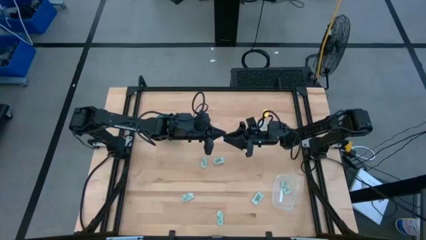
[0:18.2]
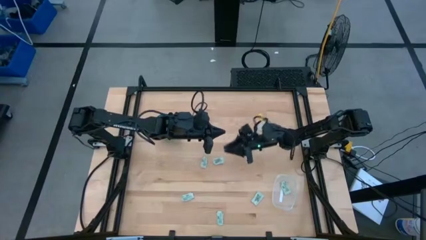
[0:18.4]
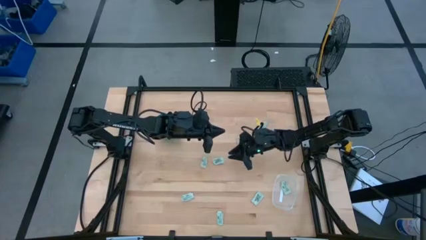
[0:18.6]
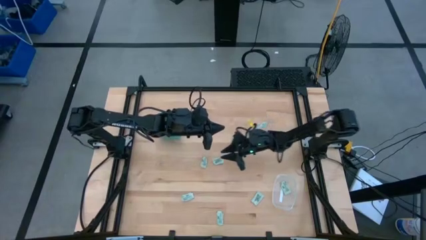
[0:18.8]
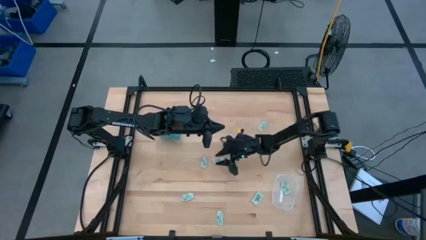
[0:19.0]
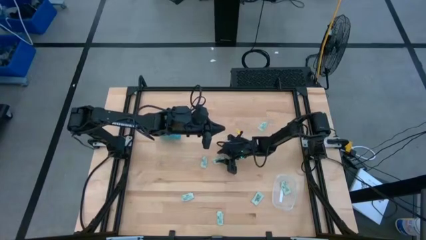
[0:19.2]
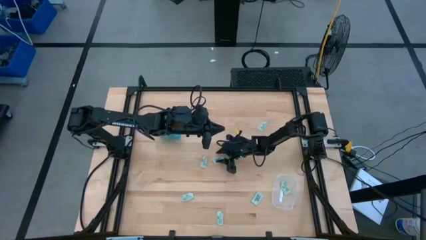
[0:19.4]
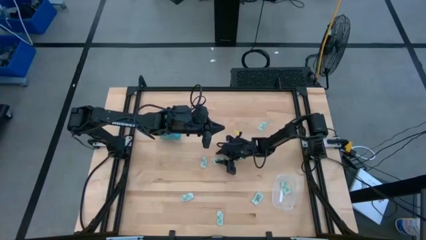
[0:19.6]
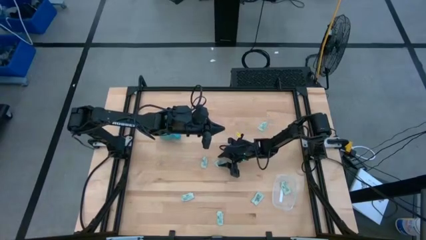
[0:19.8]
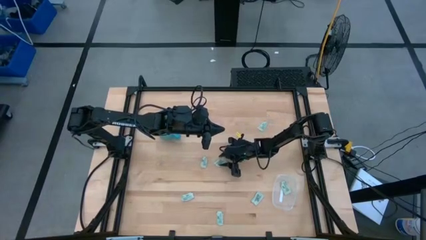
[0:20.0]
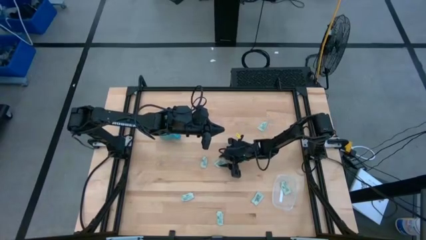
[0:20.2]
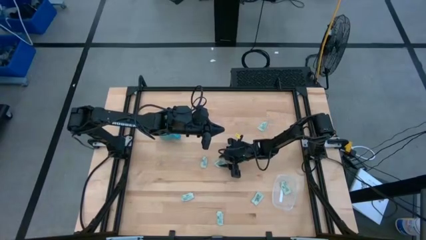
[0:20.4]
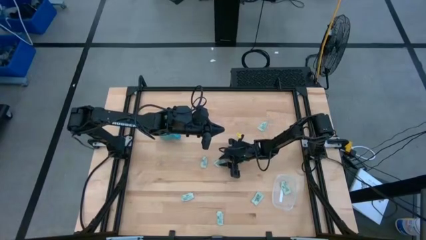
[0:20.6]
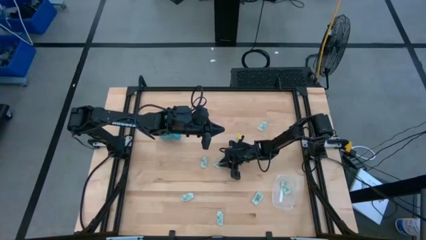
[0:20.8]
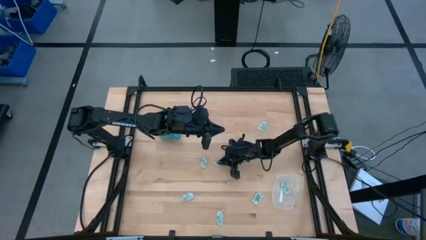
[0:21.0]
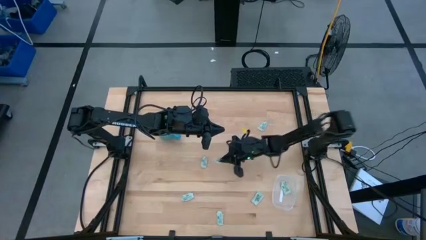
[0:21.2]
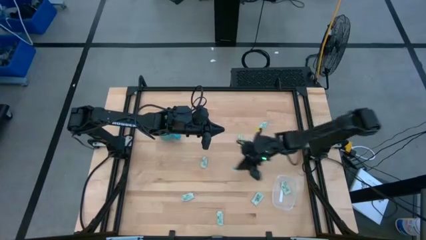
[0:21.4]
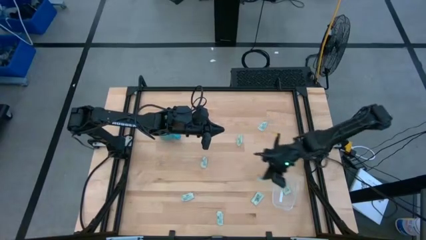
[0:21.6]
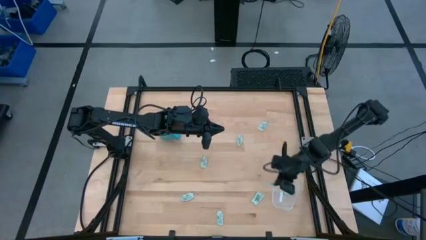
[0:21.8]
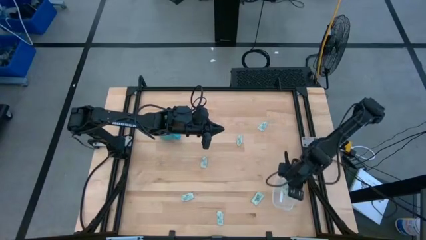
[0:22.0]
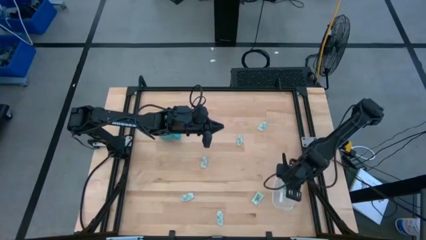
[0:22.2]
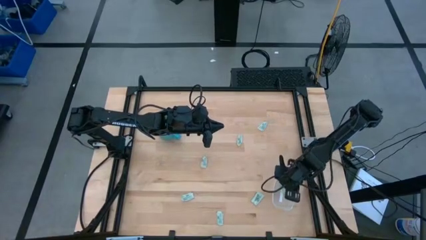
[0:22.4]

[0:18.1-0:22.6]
Task: Pick and place Stevia / Truvia into bins
Put the stevia packet into the transparent container

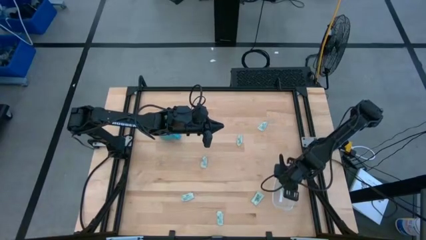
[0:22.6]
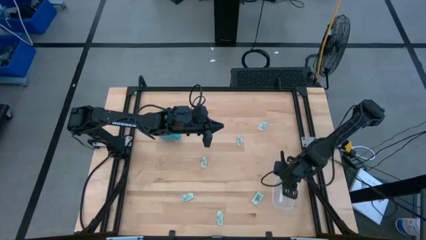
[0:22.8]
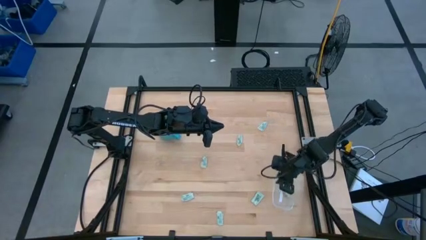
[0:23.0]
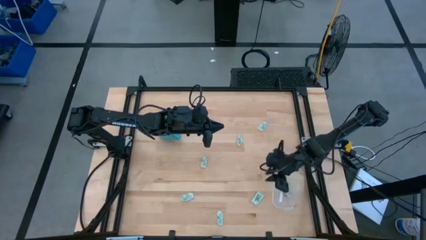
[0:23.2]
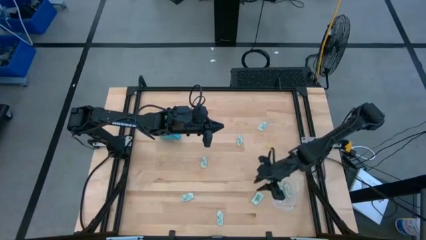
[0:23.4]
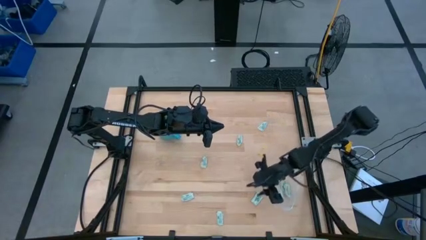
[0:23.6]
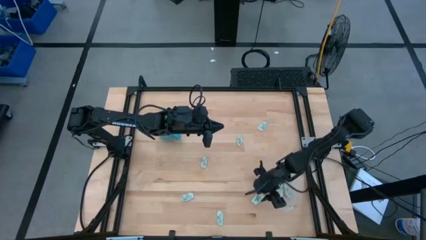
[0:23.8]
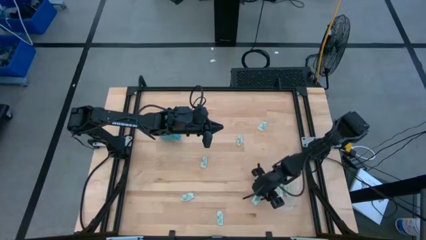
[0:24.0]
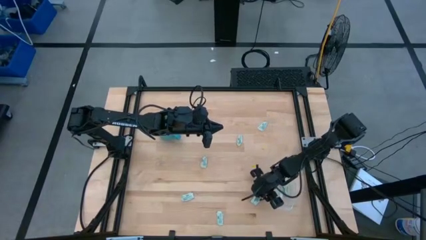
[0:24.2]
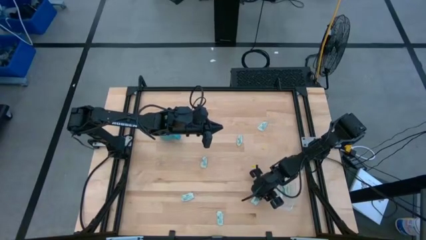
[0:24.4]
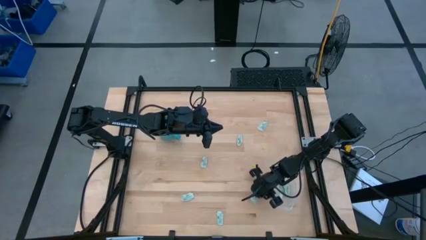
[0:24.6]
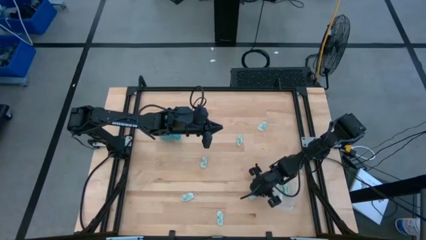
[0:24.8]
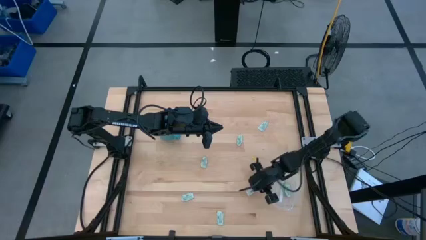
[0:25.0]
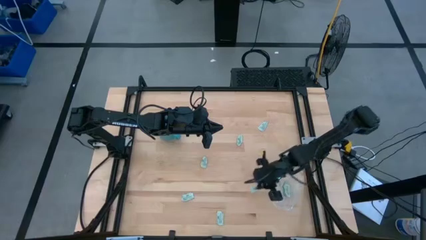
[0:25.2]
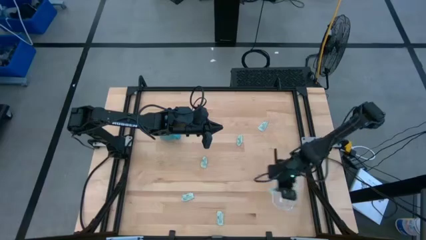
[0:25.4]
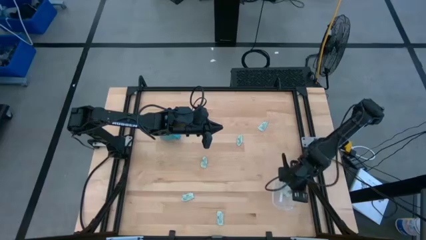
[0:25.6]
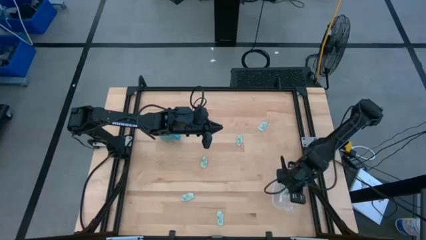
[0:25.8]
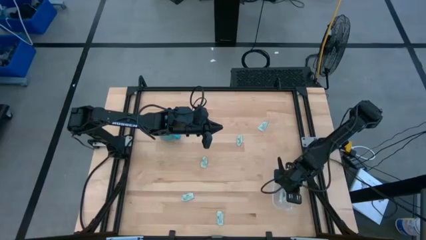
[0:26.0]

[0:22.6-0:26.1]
Put the stevia packet into the transparent container

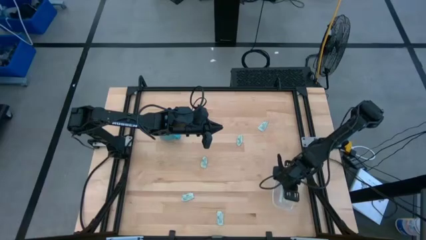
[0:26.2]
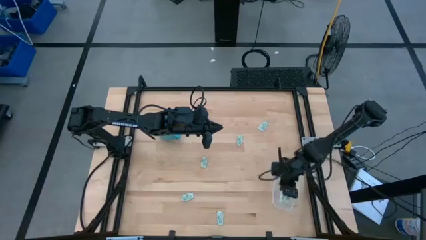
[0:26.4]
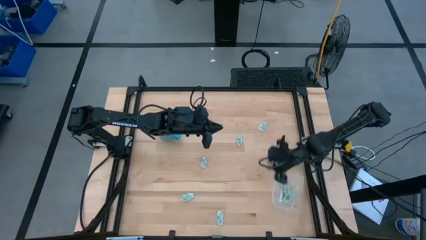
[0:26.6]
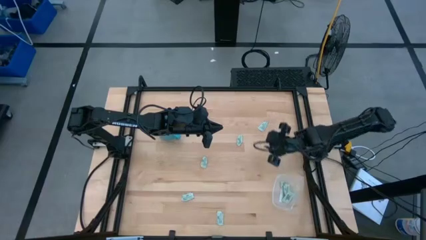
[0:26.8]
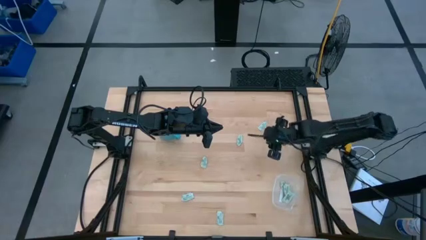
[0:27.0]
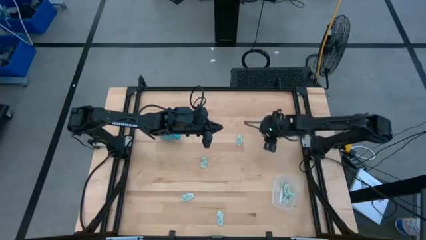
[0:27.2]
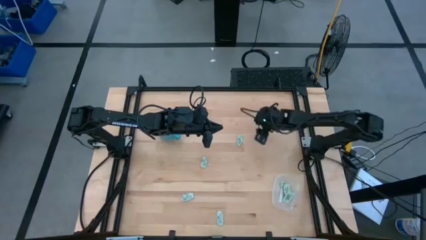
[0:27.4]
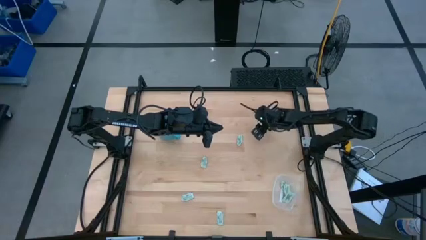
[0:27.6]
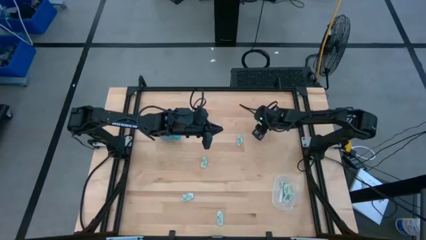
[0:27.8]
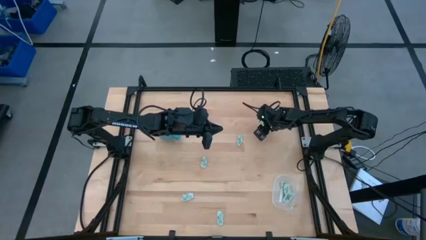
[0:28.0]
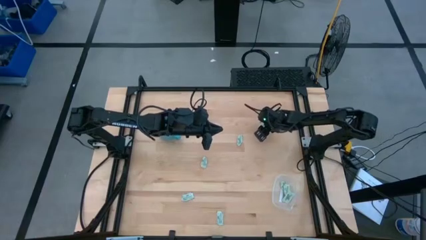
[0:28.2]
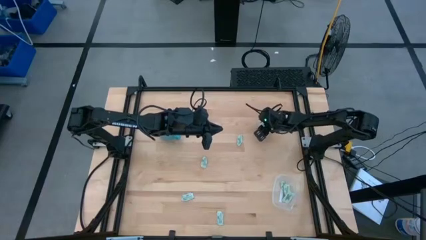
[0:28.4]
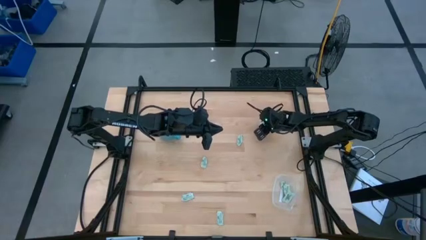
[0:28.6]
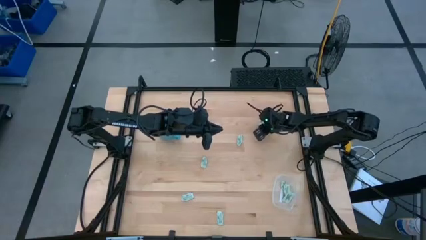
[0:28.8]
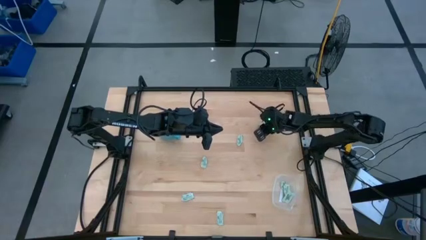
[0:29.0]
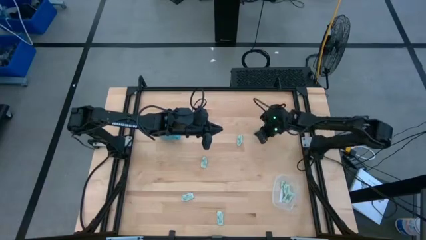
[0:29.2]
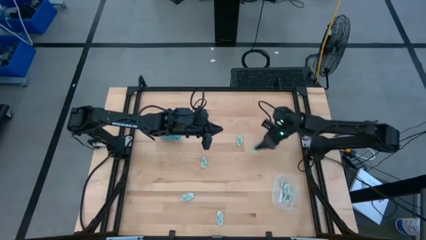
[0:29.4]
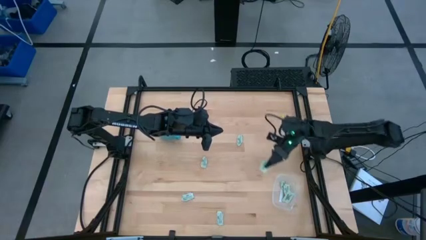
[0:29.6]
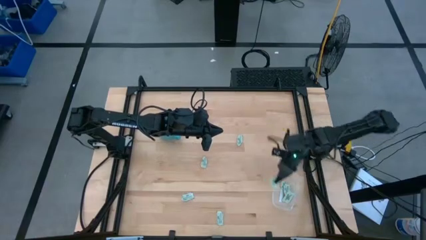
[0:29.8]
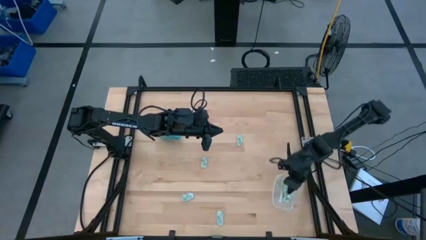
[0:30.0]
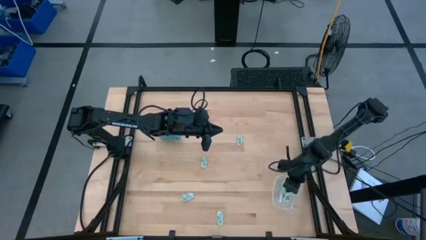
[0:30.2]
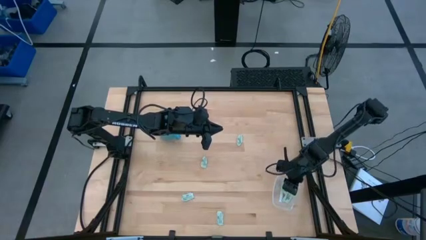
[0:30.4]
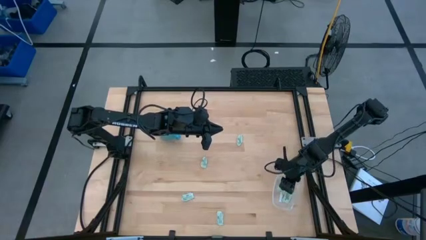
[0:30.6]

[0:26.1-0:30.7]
Put the stevia packet into the transparent container

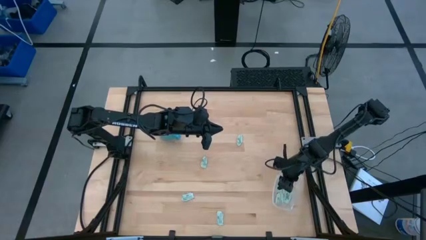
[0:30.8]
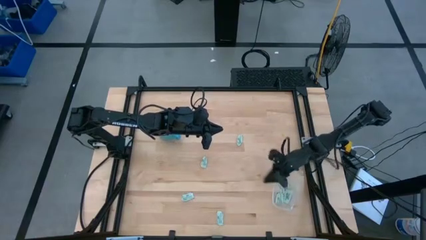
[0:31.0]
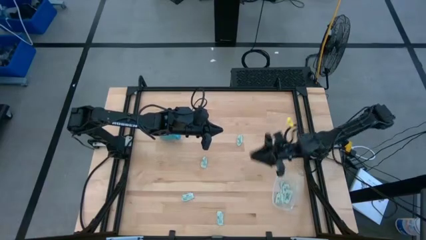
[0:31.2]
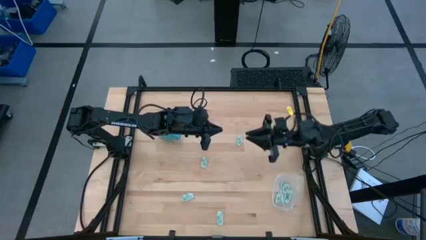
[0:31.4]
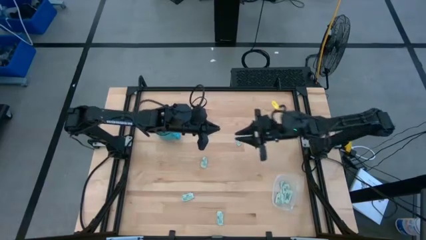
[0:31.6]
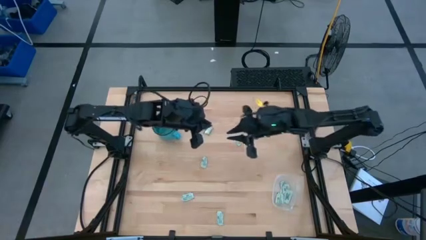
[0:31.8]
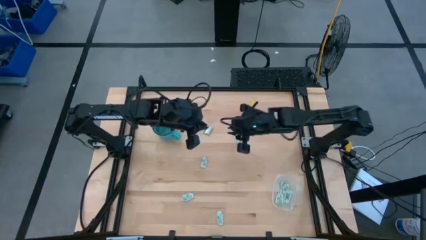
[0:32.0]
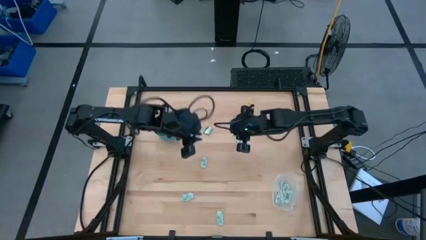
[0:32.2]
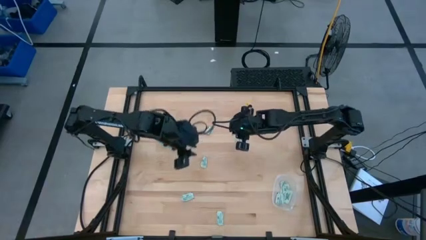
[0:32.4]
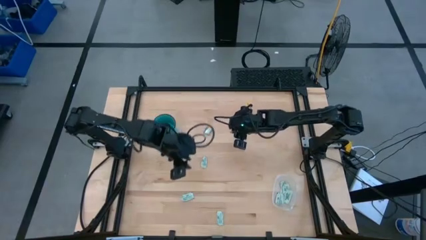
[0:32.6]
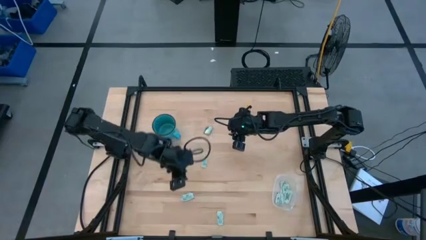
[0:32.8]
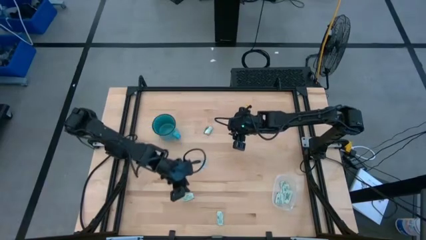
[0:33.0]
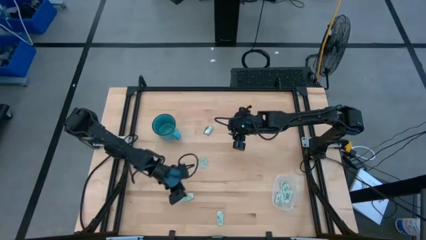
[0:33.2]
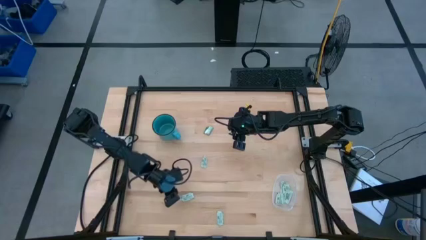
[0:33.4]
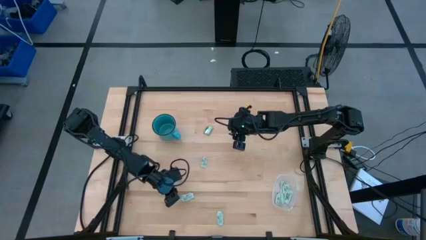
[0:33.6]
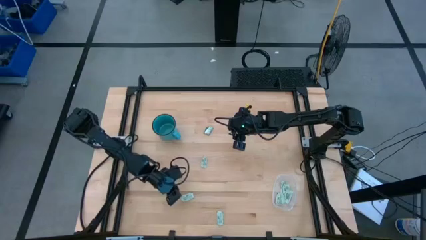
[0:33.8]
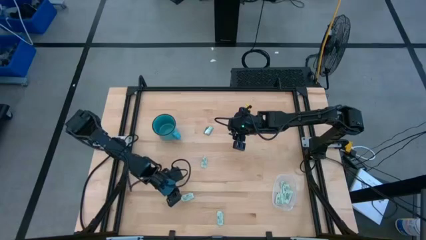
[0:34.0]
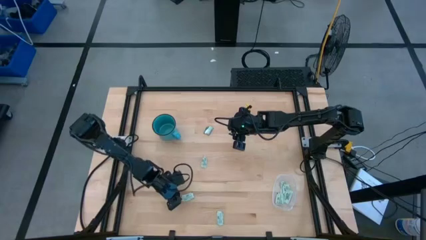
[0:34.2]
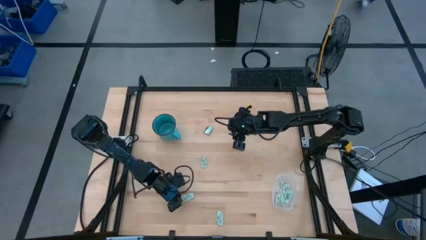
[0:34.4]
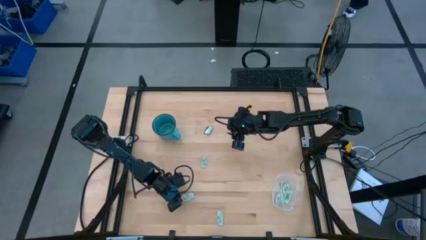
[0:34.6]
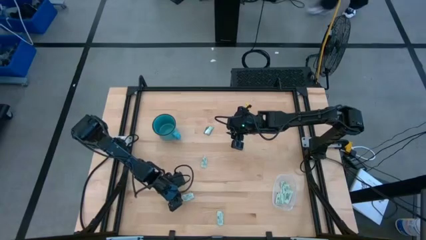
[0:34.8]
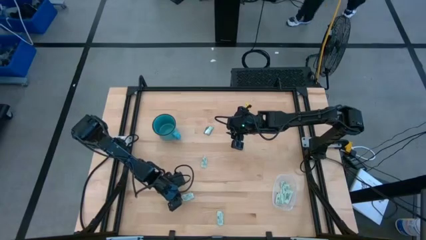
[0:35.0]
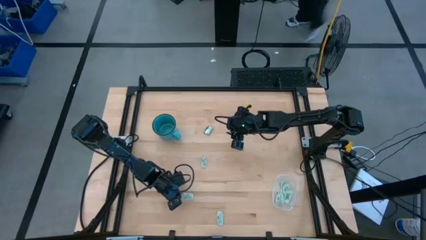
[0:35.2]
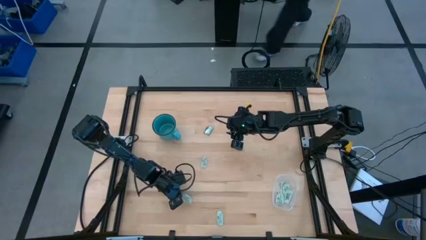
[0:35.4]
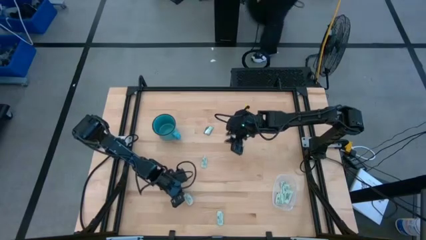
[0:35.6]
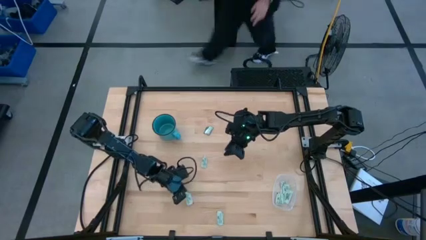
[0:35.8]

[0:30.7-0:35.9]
Put the stevia packet into the transparent container
